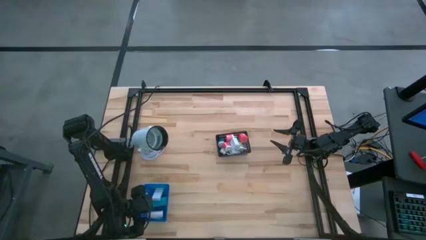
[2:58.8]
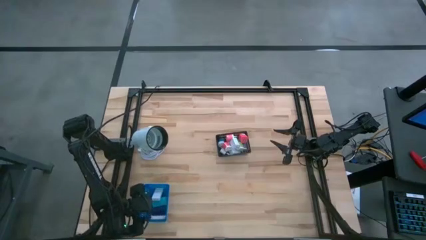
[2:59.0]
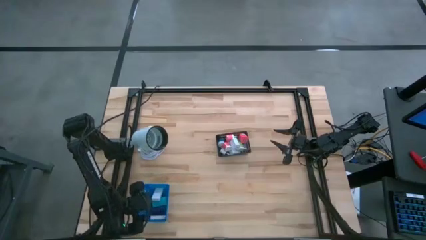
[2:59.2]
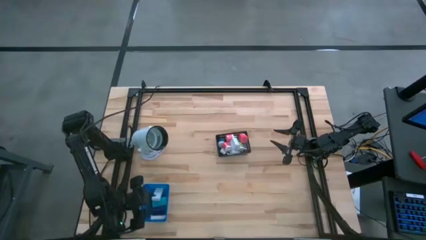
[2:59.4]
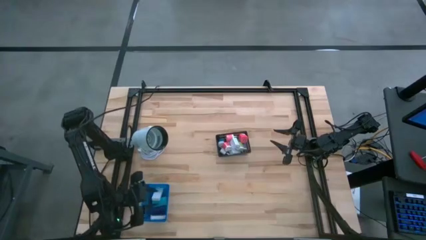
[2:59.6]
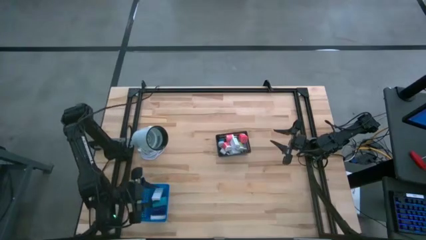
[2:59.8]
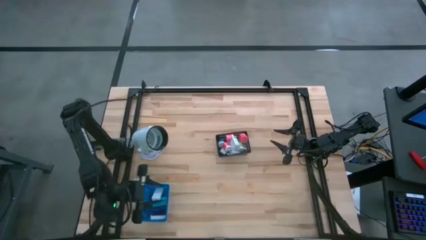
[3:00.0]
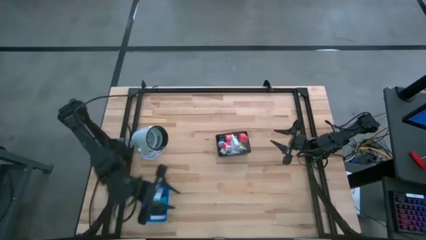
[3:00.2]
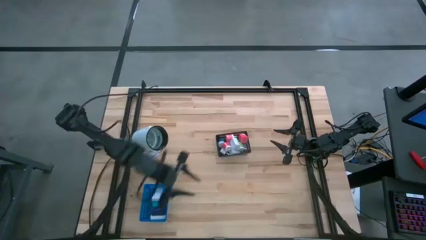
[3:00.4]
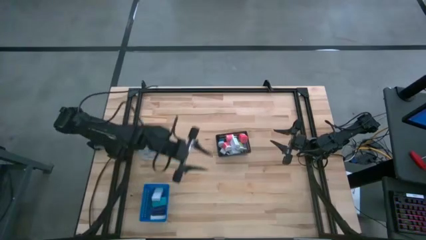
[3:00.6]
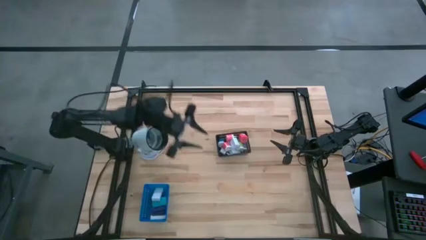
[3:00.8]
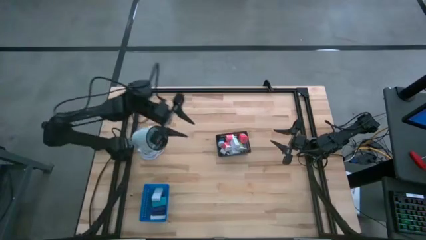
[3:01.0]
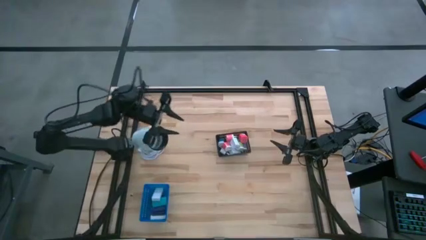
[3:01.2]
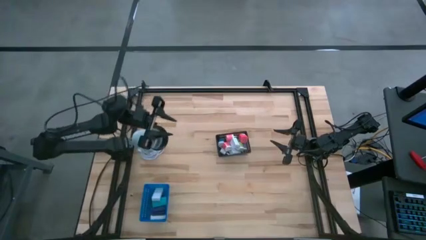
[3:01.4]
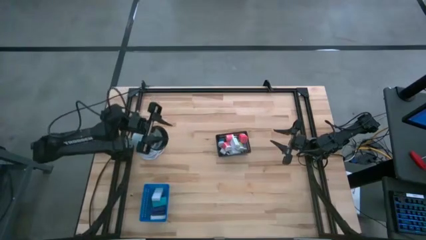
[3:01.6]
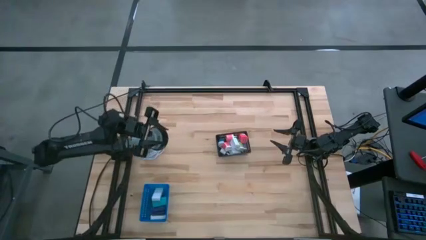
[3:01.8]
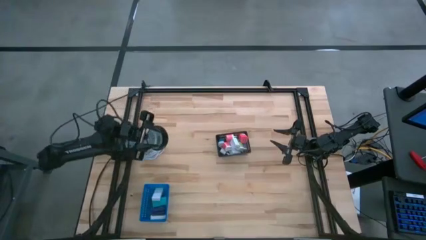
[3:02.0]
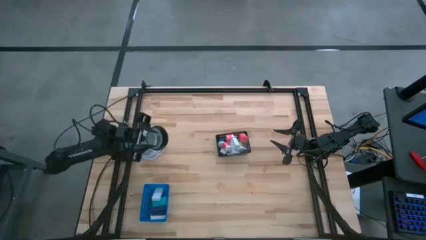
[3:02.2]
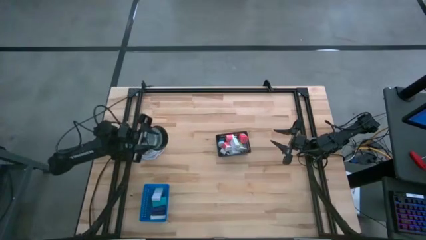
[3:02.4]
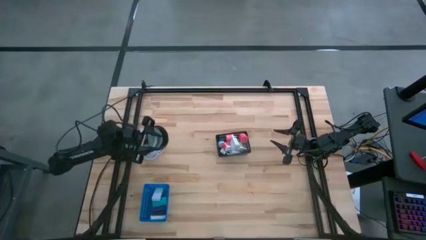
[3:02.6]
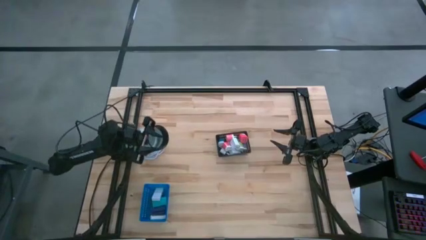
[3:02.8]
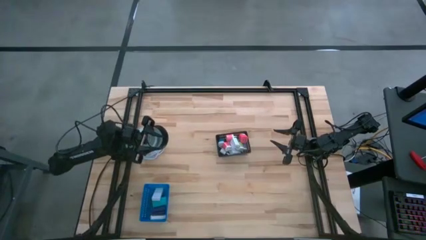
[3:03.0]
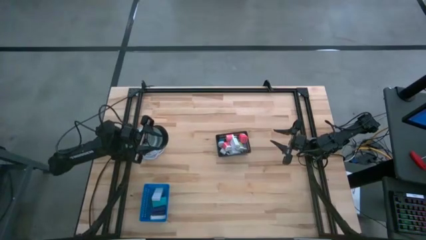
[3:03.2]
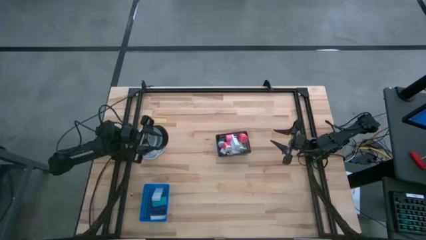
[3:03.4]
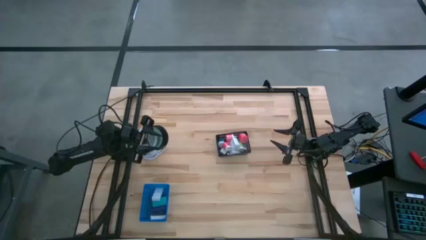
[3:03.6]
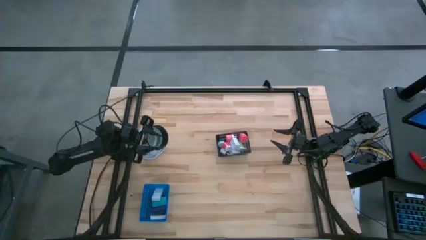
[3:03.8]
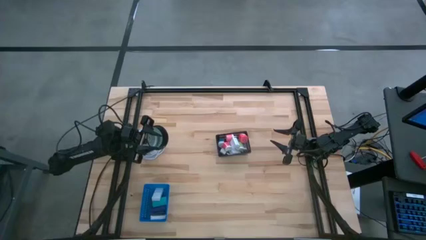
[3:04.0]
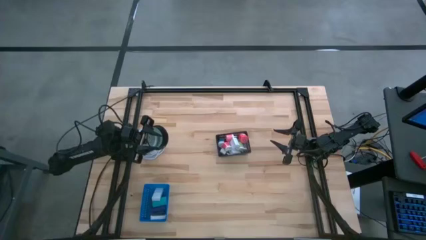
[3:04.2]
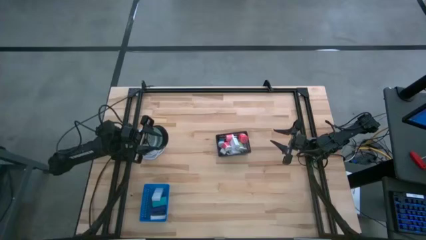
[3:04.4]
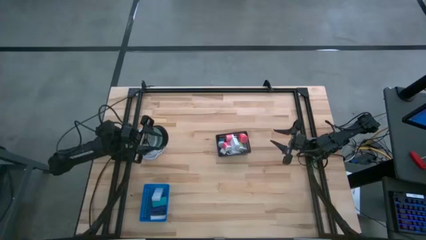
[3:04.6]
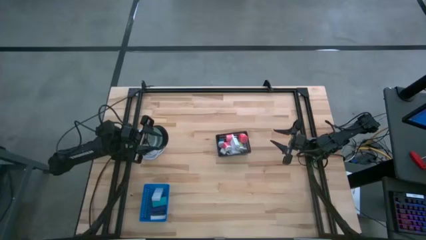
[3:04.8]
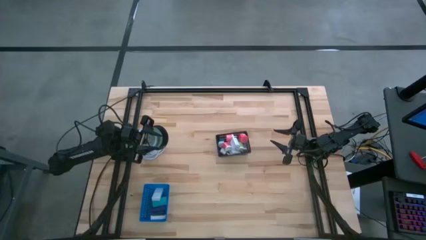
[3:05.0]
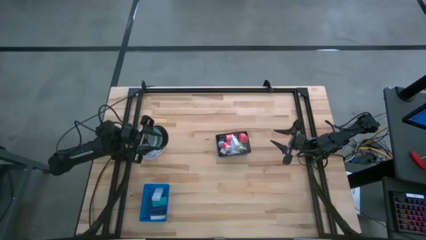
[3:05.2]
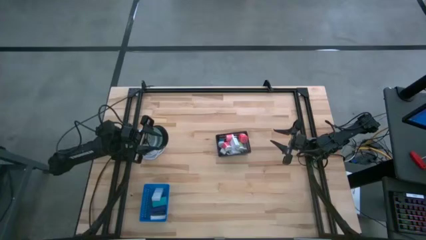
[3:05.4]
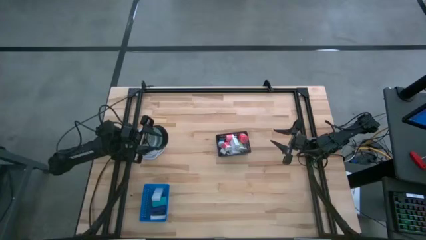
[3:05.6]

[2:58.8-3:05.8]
Task: Pick & Place Office items
Return to Home Position

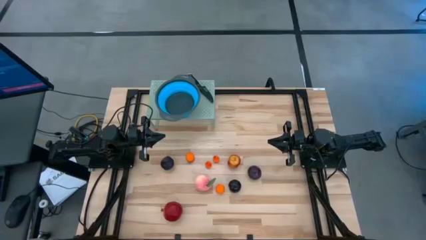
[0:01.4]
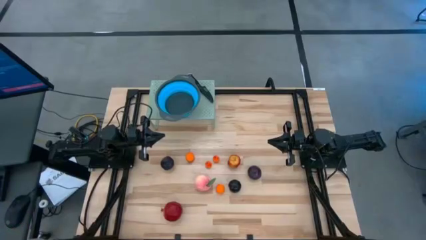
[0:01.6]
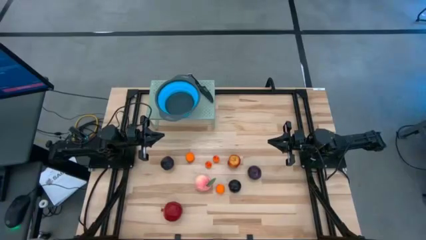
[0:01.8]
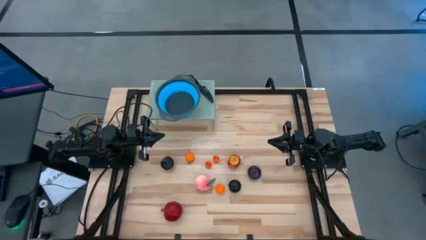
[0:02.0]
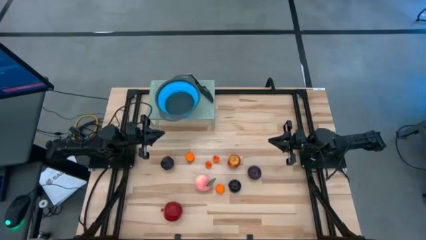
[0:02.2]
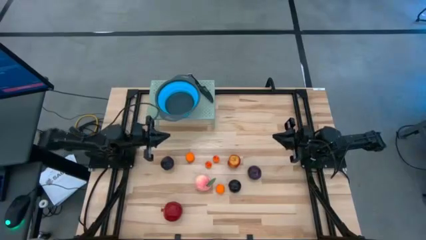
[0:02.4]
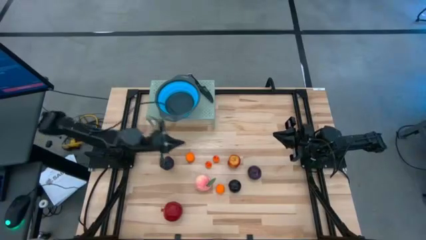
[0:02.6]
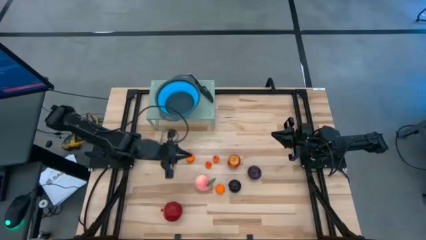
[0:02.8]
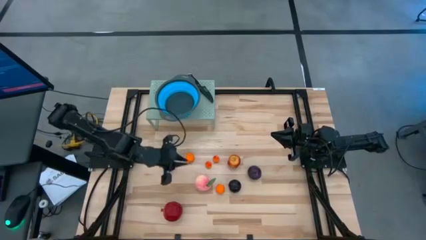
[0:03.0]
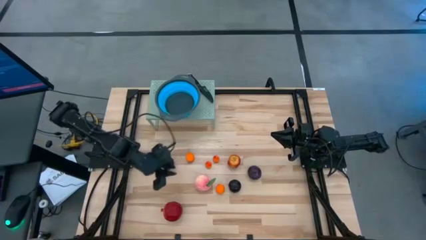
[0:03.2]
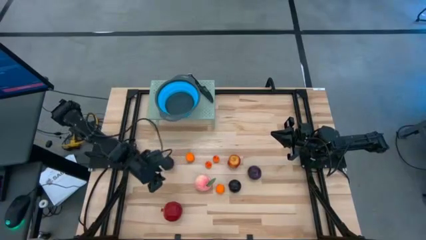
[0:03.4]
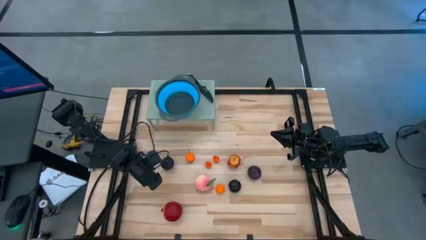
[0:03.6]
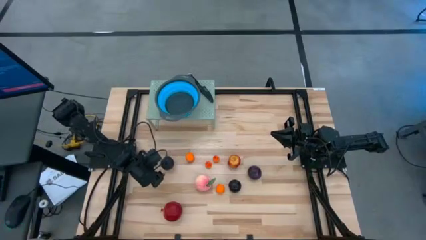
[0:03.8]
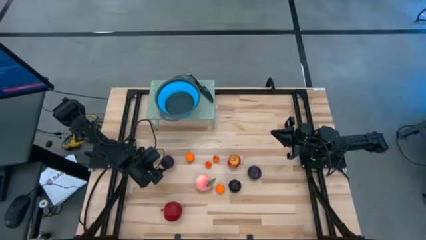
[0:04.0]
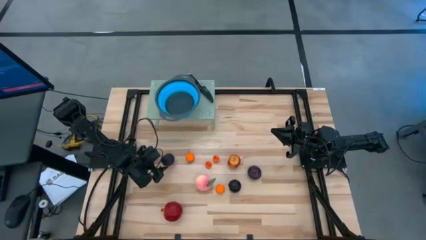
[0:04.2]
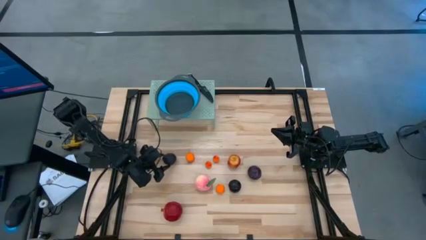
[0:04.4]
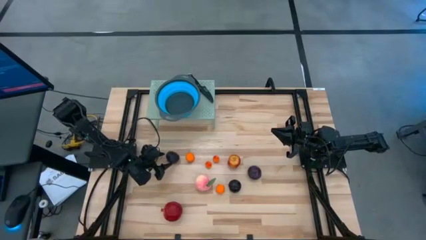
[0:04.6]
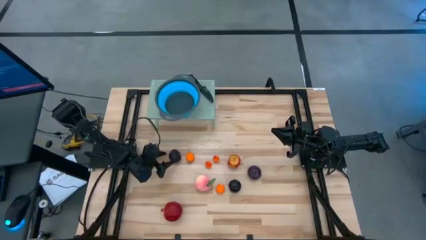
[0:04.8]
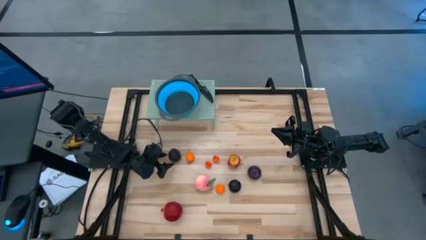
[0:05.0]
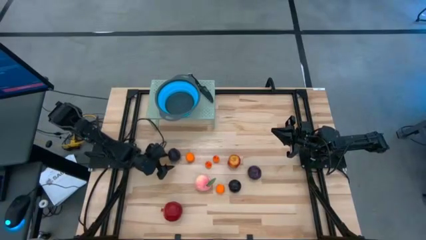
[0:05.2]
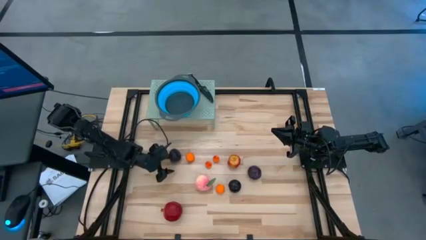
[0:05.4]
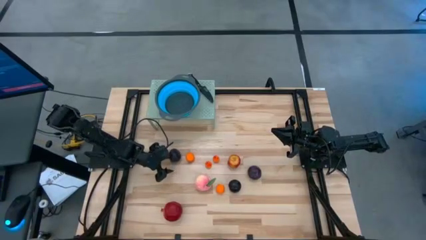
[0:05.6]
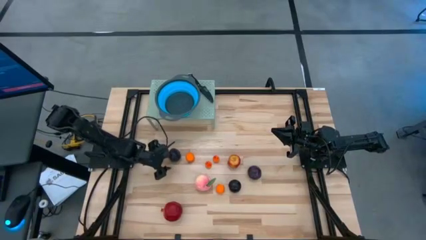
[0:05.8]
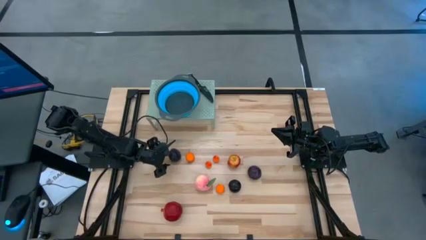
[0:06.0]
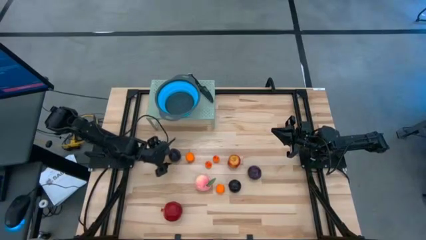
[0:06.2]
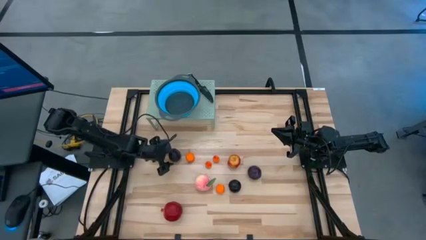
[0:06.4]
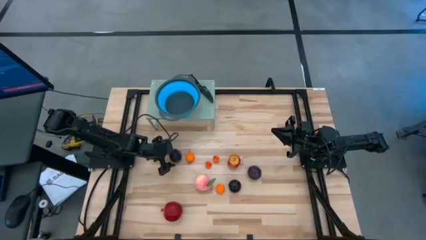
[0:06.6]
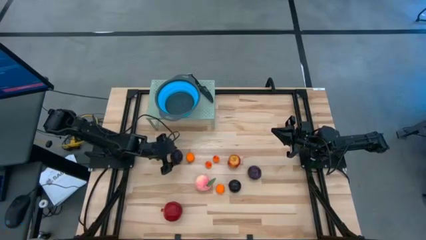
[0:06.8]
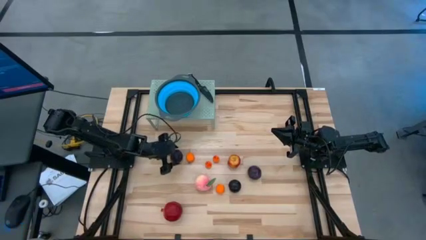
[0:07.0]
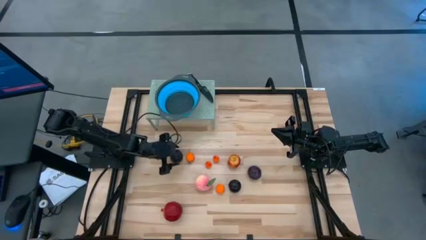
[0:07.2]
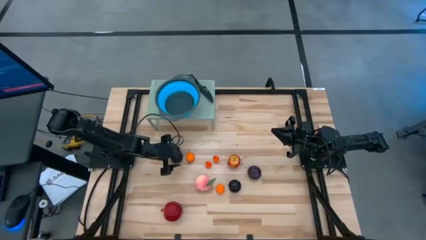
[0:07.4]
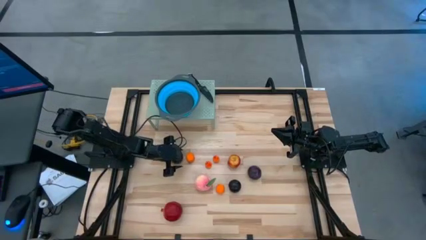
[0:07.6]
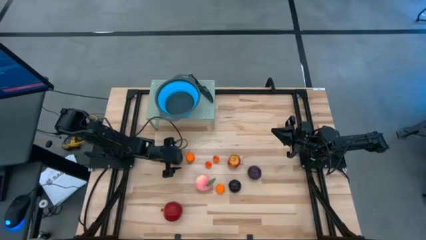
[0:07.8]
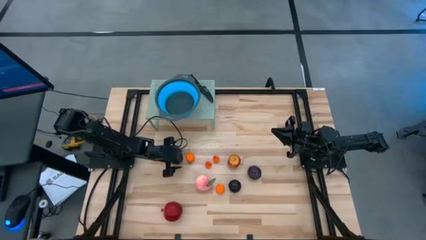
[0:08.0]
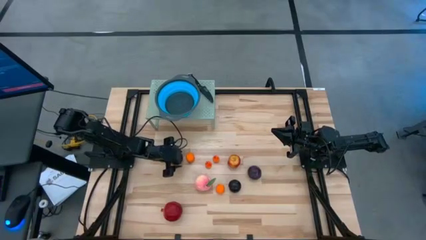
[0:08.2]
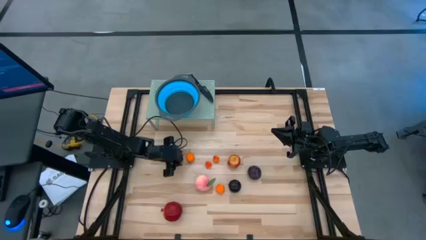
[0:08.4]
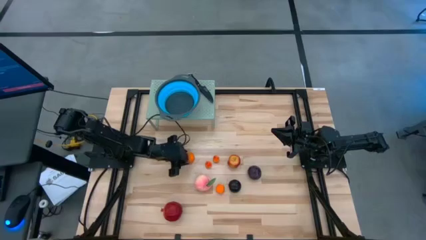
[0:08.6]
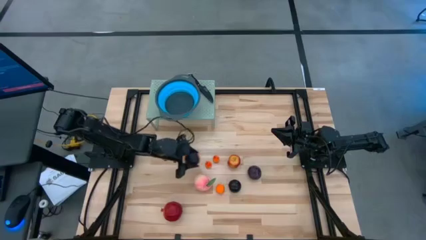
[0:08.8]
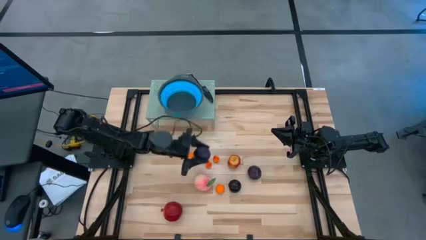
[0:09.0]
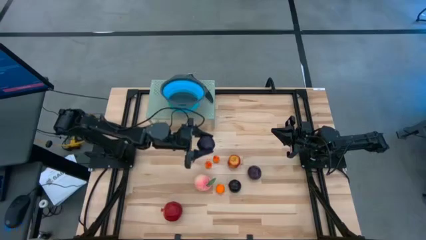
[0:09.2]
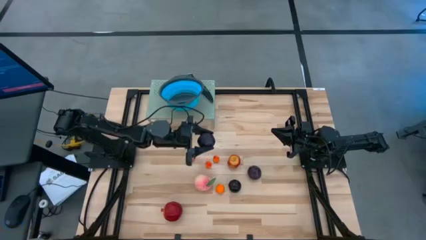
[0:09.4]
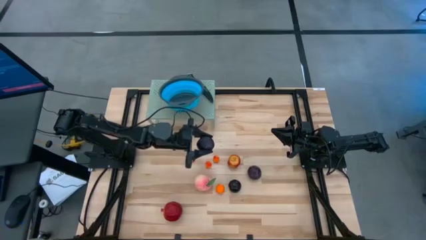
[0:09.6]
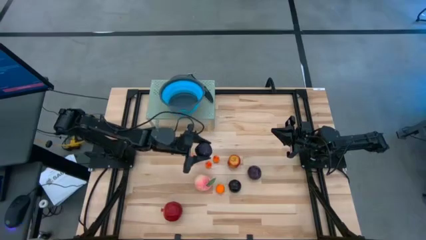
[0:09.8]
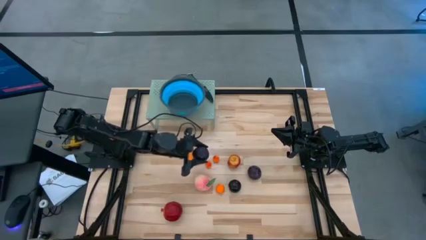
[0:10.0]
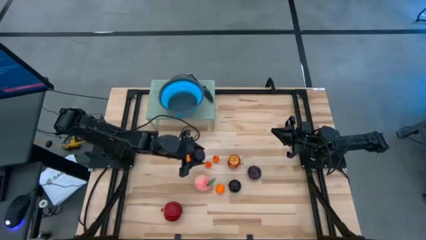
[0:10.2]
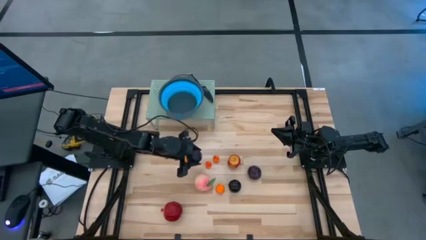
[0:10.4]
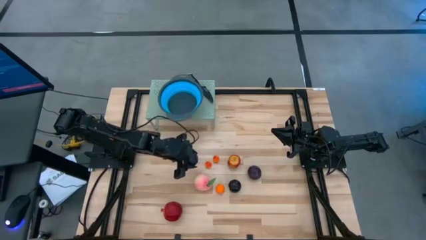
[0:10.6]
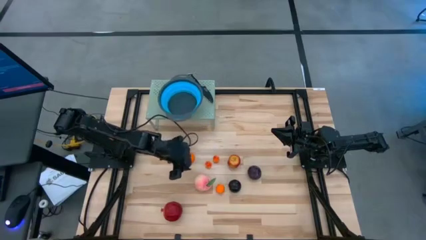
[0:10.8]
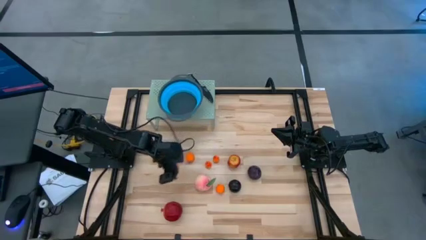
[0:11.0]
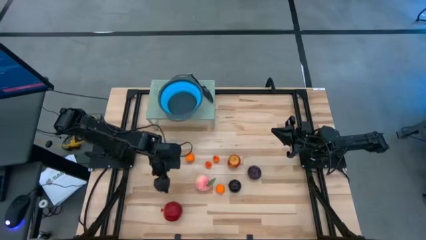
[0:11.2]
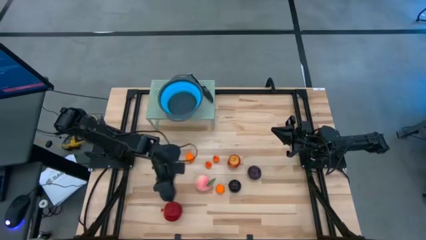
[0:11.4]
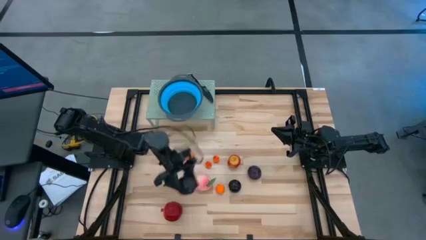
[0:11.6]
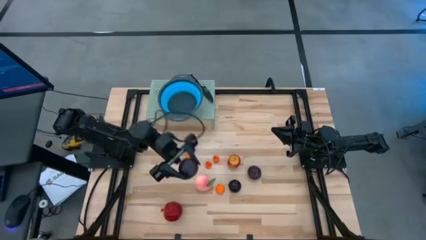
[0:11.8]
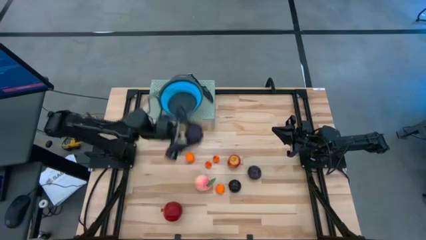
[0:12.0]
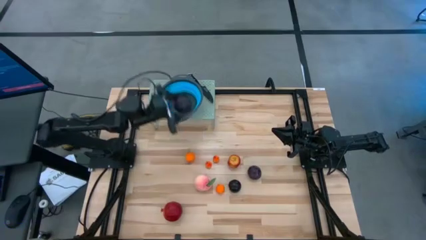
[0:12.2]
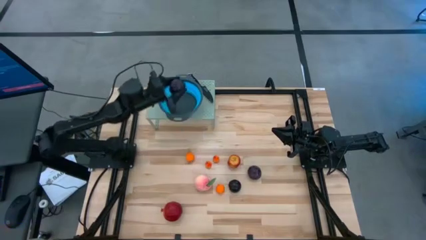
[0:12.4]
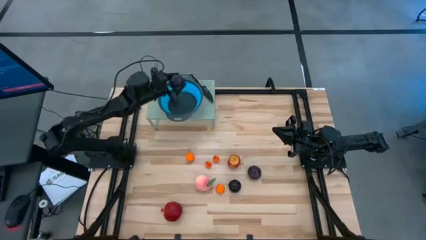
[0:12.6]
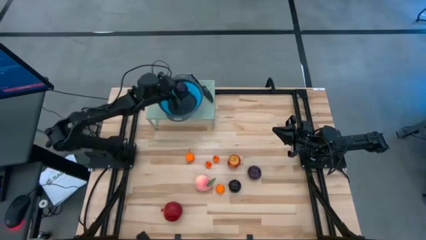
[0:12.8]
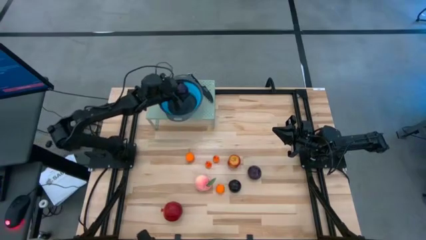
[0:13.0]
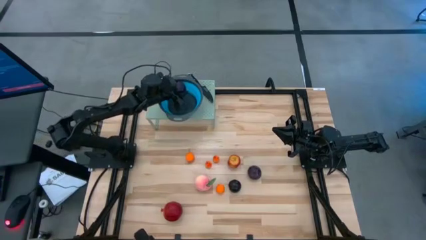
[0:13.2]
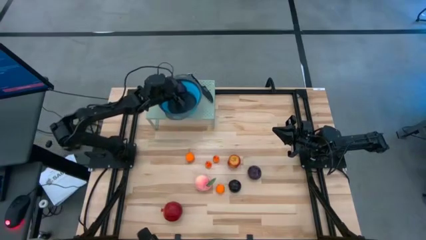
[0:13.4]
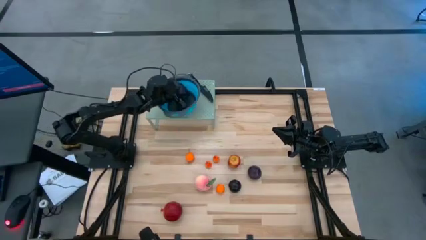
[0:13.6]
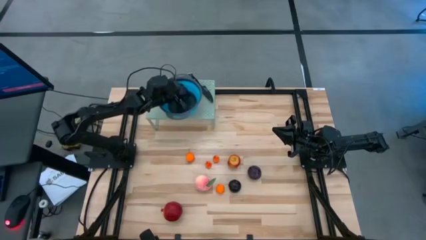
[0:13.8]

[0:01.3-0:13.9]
Task: Pick & Place Fruit
Put the top left purple plum into the blue strainer bowl on the shelf
